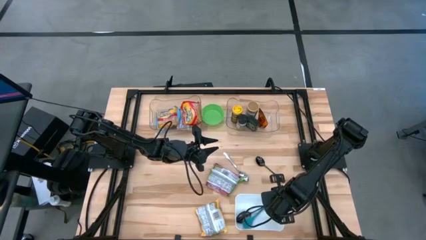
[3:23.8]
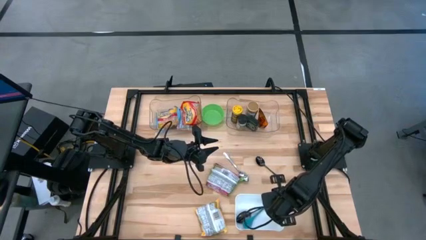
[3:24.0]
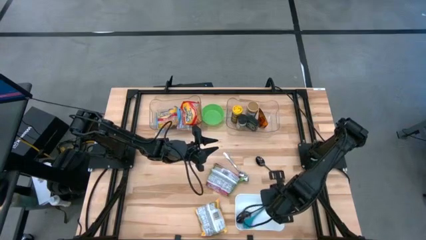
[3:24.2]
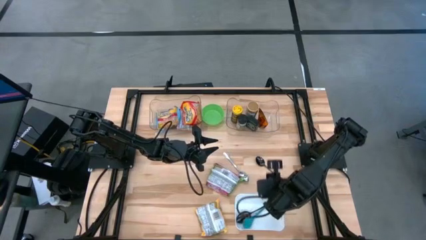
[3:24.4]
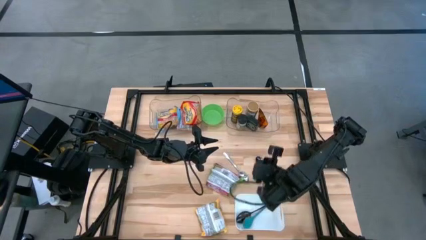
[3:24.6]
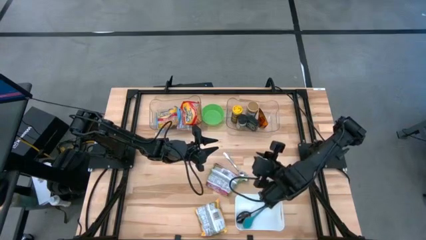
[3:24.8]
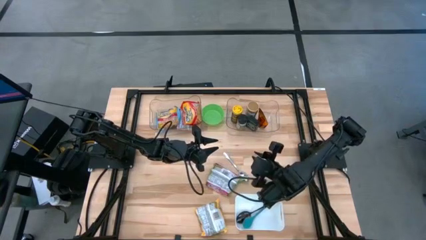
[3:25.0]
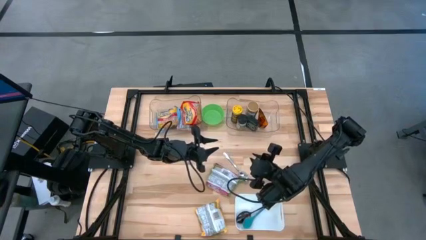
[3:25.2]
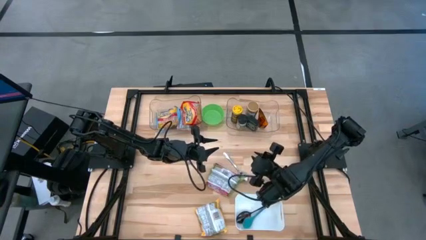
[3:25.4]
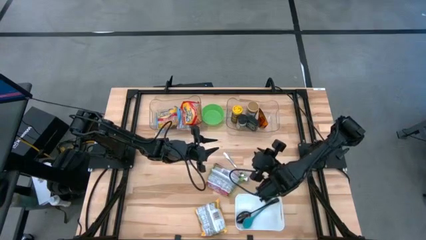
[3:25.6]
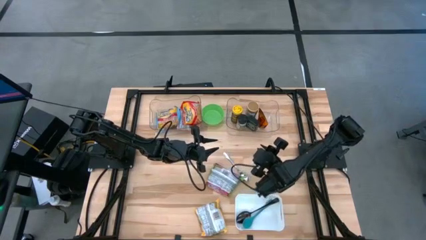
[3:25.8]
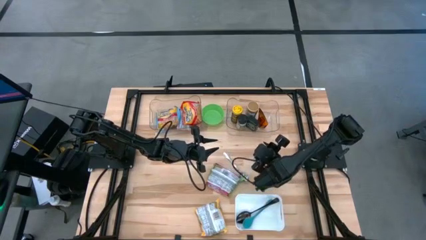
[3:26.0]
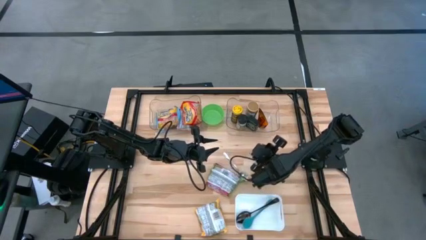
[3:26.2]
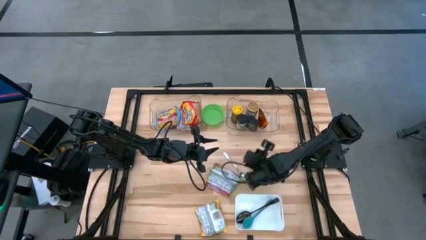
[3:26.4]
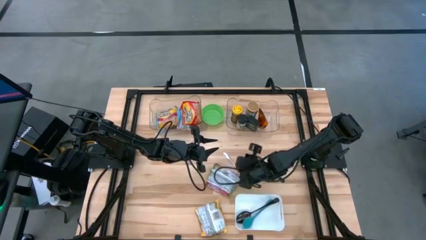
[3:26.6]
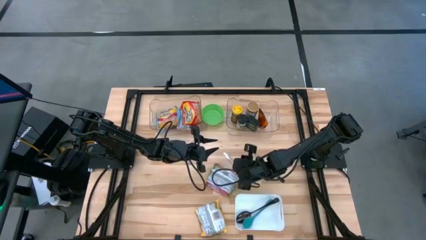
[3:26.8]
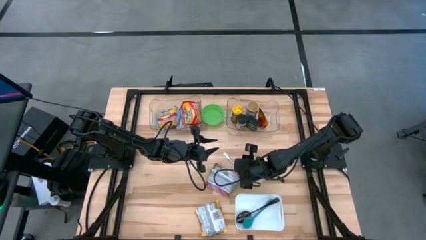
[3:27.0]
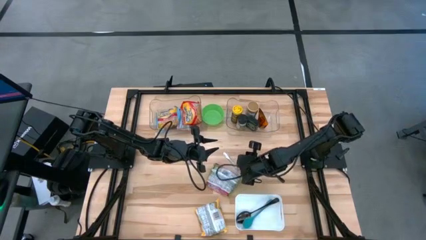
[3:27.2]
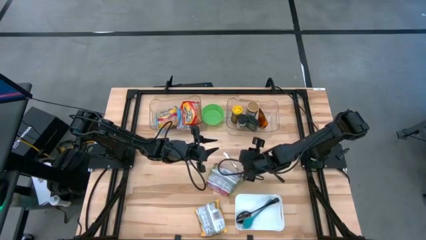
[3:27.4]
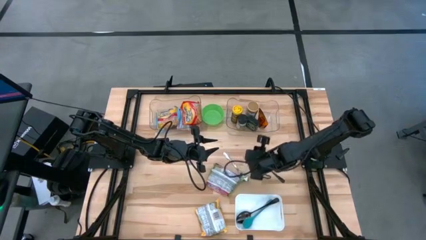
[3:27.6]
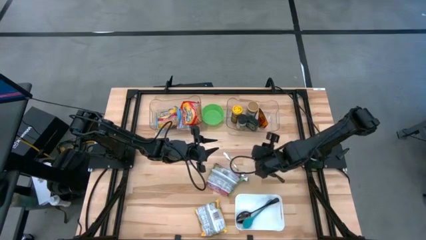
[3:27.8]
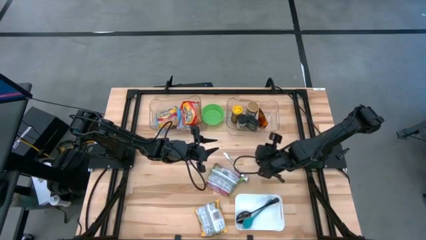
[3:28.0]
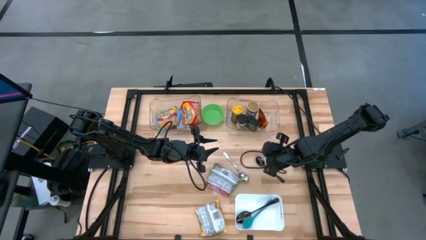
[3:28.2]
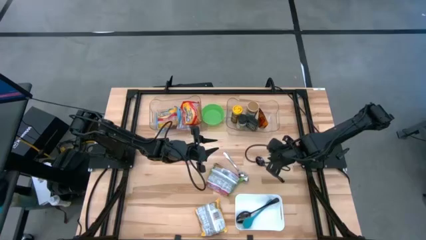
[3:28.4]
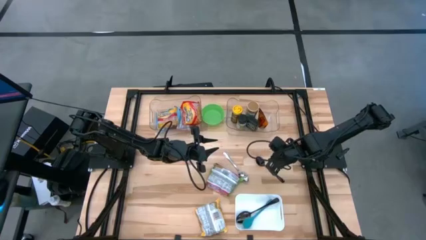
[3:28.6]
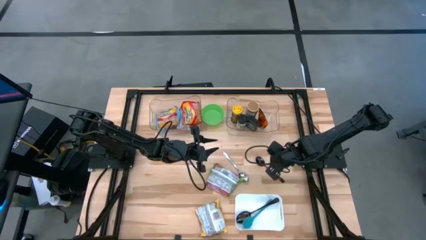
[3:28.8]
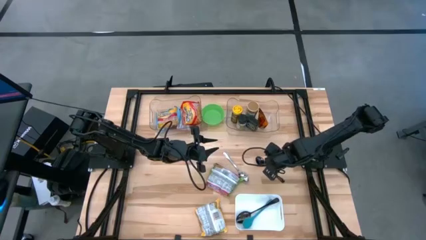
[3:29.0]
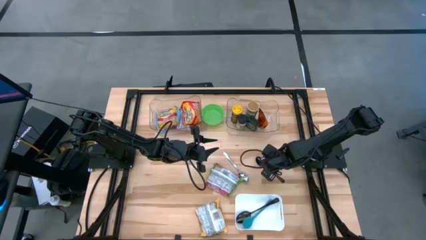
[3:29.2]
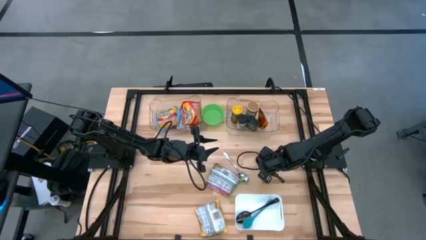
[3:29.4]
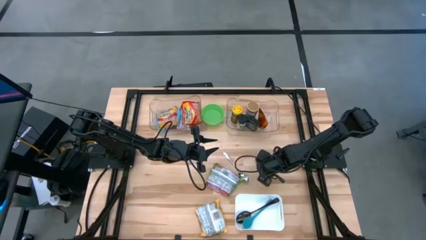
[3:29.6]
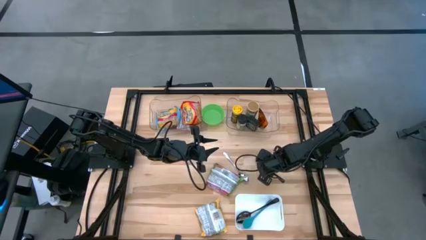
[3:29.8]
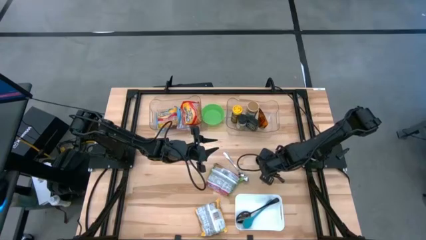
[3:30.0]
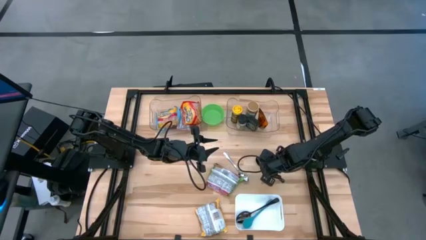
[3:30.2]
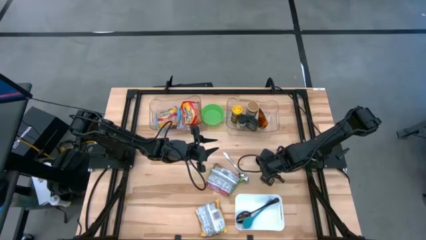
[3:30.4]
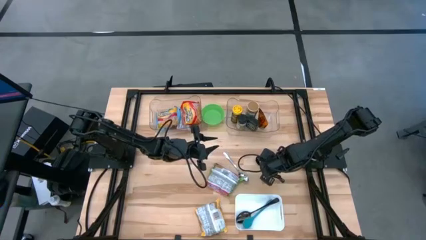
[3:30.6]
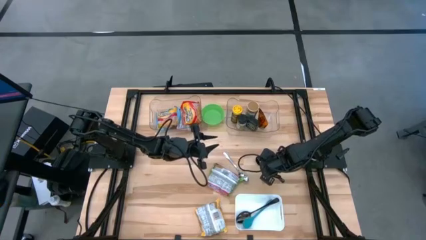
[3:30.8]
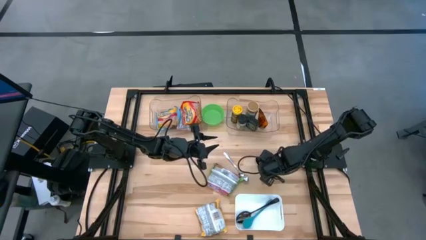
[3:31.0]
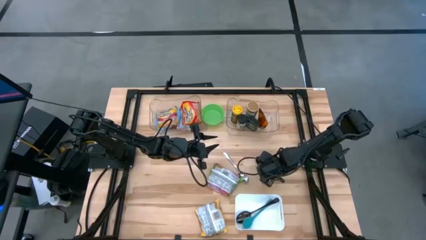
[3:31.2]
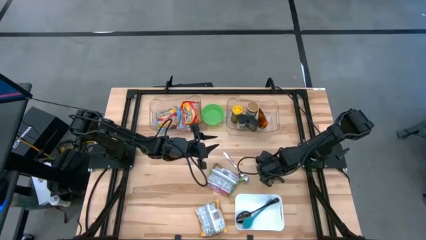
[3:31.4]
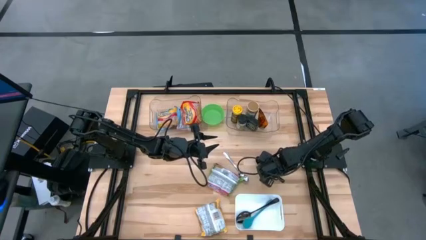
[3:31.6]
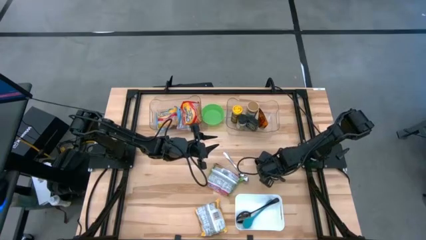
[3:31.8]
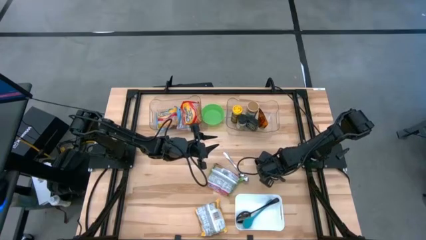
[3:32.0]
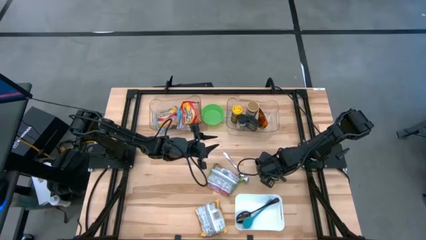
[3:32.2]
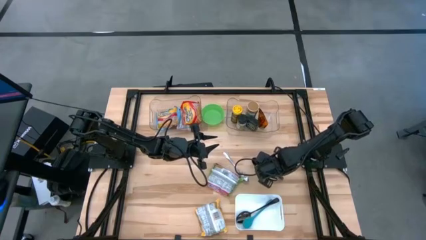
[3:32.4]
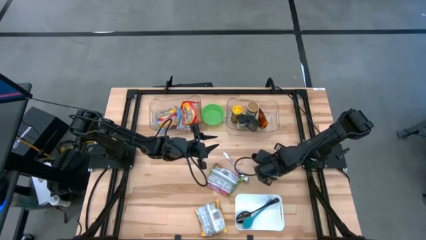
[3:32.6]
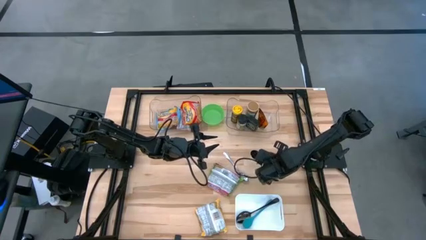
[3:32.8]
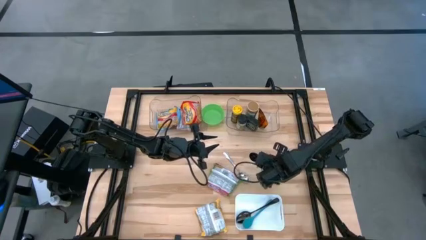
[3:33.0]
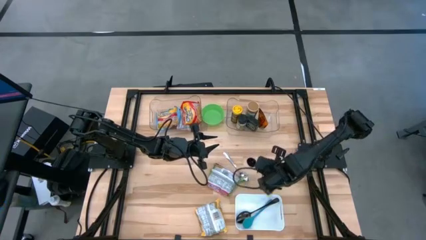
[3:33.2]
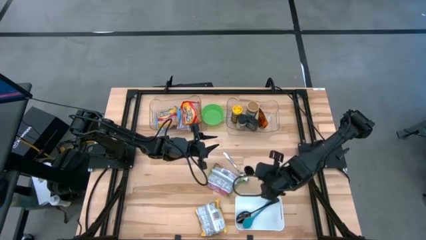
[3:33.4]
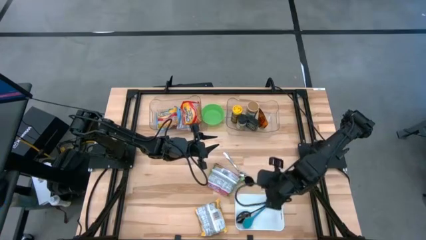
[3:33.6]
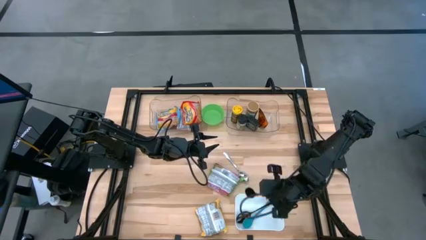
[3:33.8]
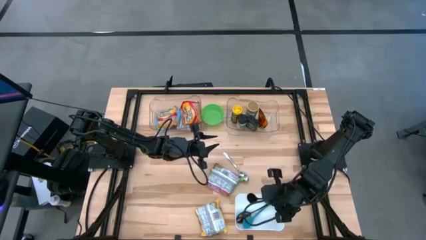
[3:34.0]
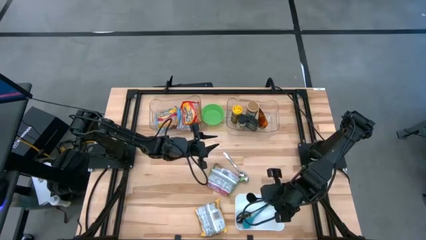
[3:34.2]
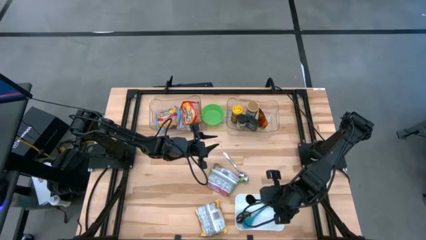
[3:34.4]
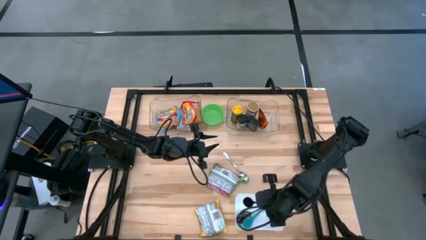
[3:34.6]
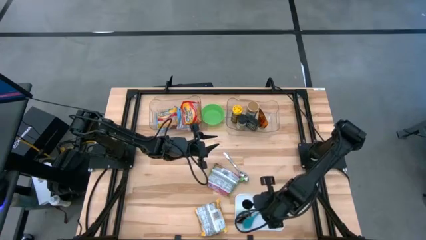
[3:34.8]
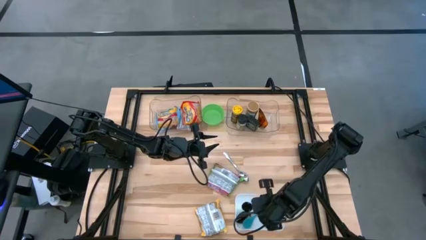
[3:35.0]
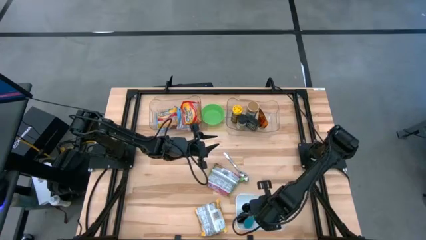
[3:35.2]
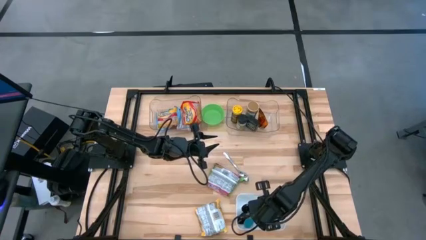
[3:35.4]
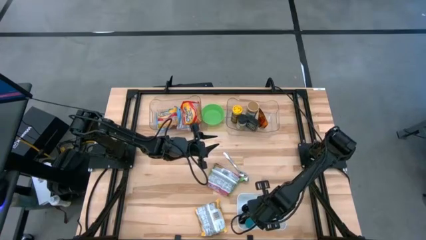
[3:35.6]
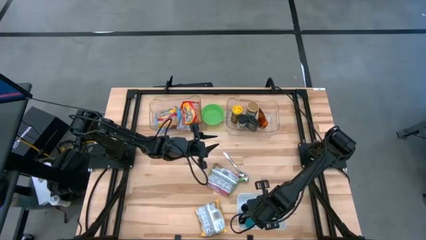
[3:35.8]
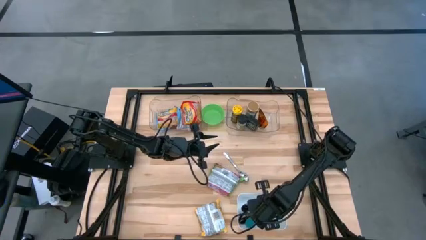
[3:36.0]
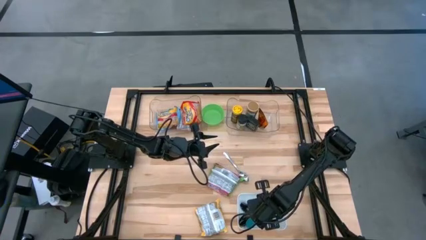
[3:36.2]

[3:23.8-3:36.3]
Task: Pick & Place Food Item
Put the black spoon in the white bin
